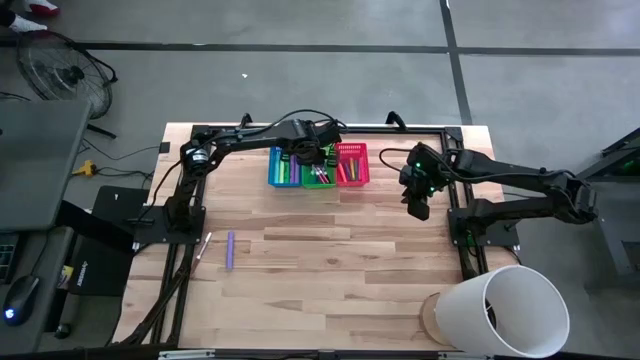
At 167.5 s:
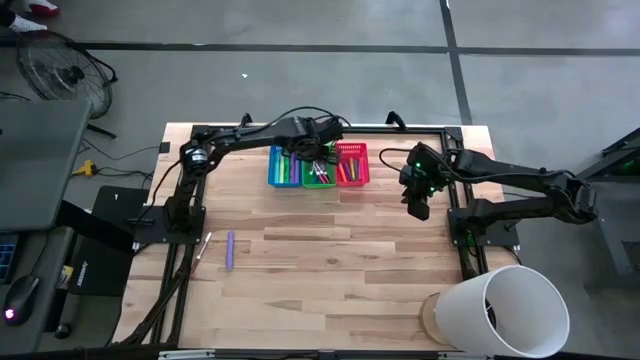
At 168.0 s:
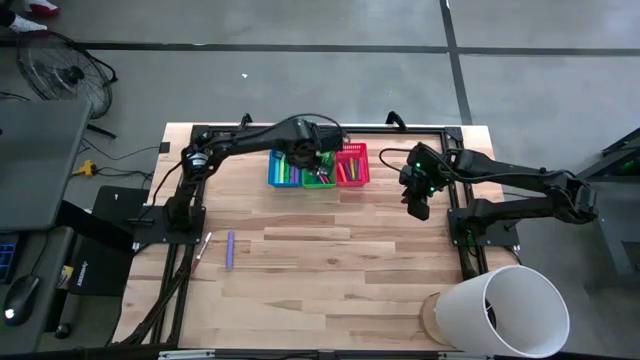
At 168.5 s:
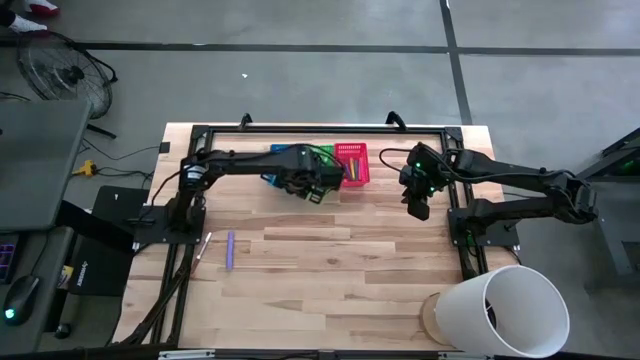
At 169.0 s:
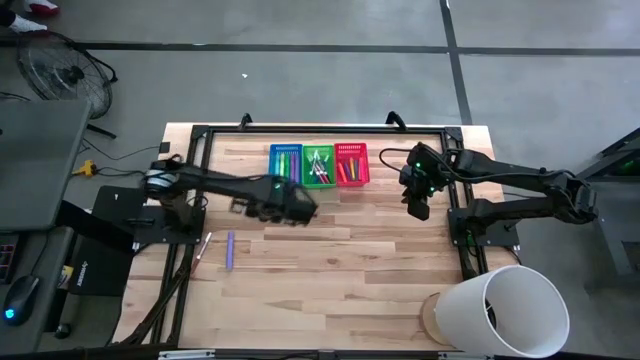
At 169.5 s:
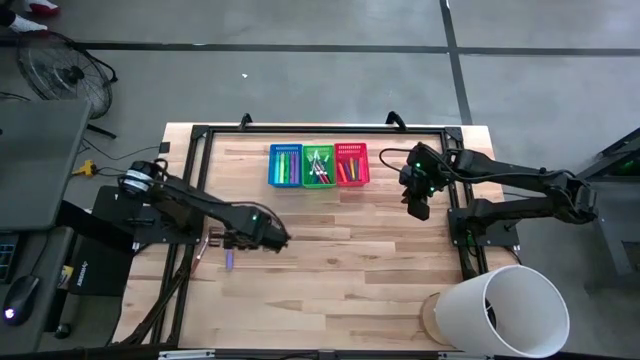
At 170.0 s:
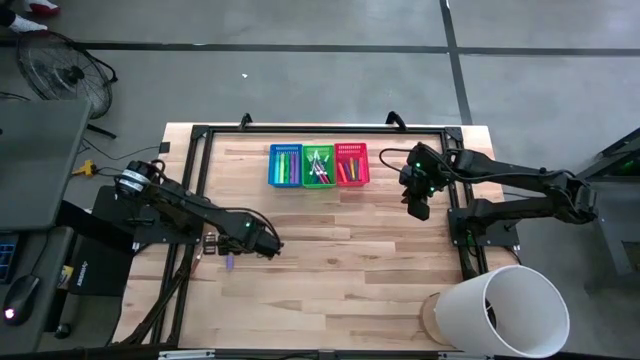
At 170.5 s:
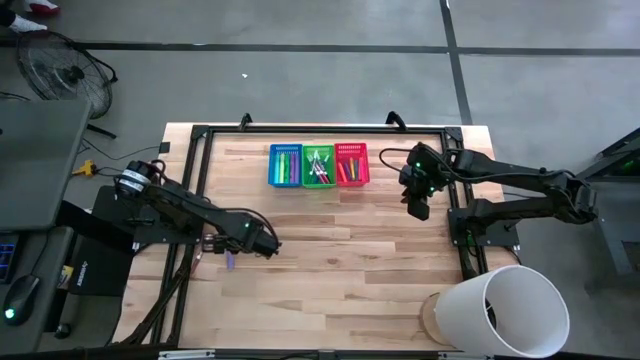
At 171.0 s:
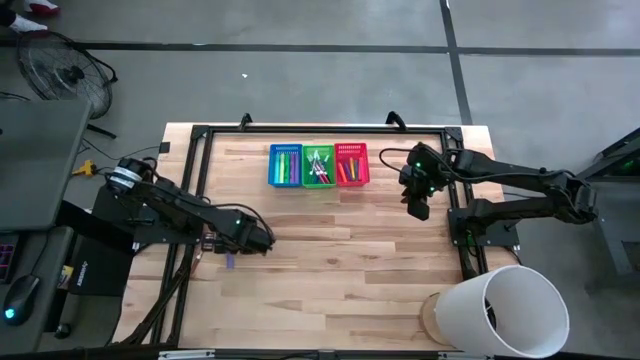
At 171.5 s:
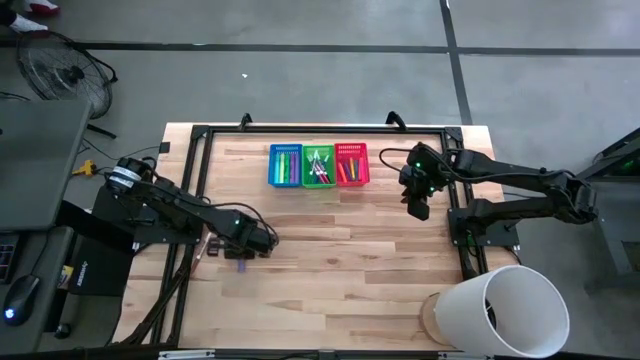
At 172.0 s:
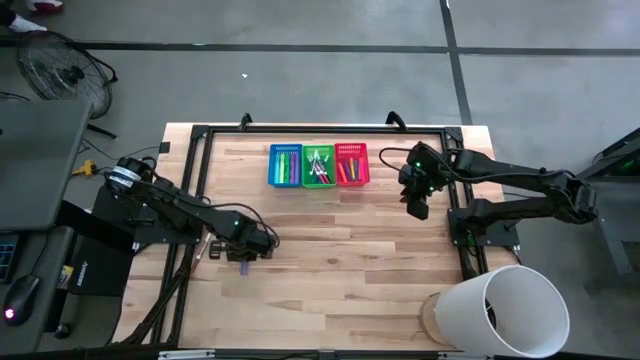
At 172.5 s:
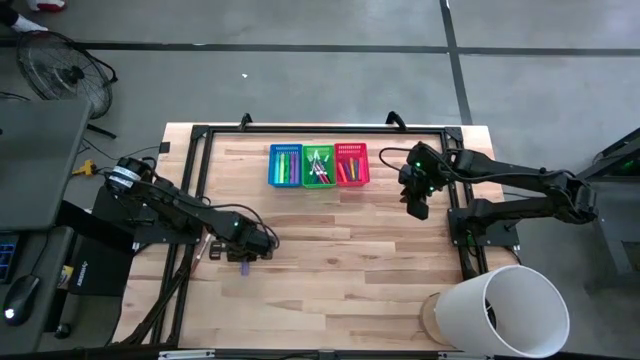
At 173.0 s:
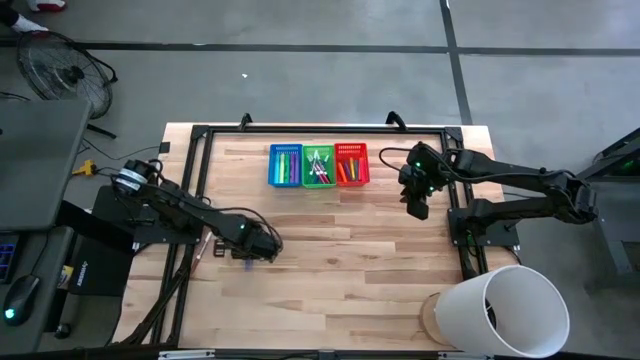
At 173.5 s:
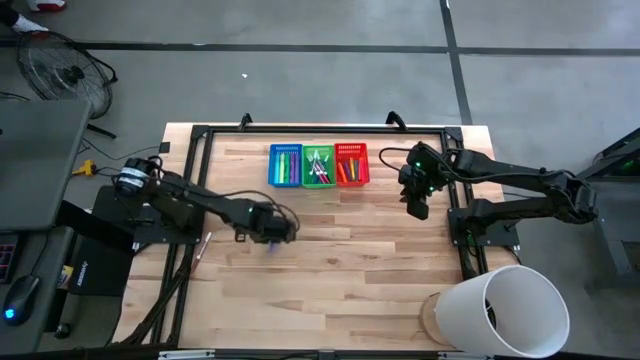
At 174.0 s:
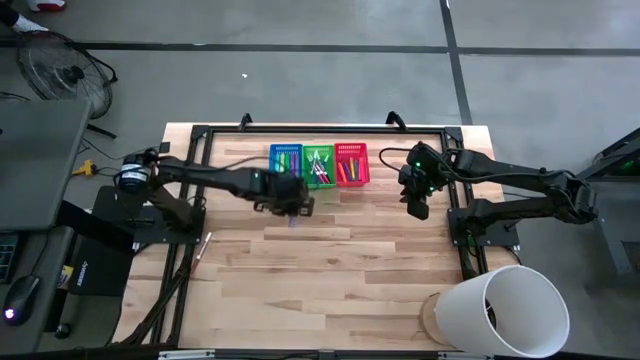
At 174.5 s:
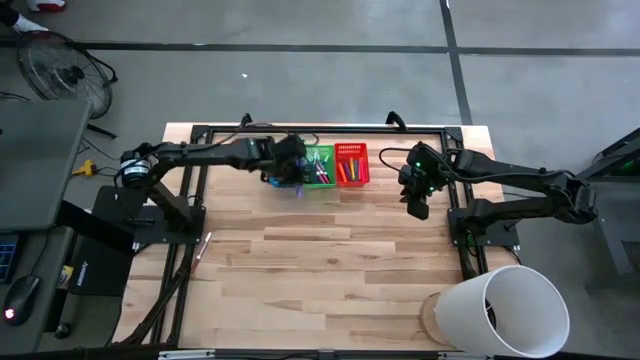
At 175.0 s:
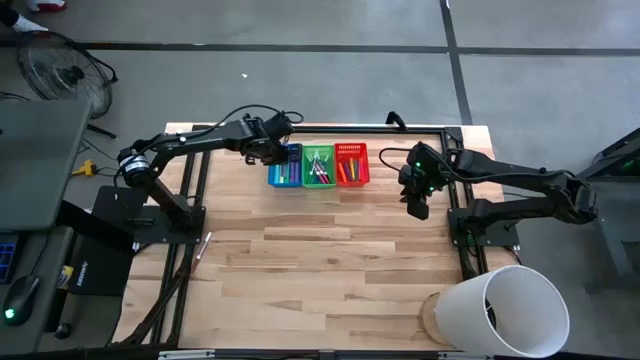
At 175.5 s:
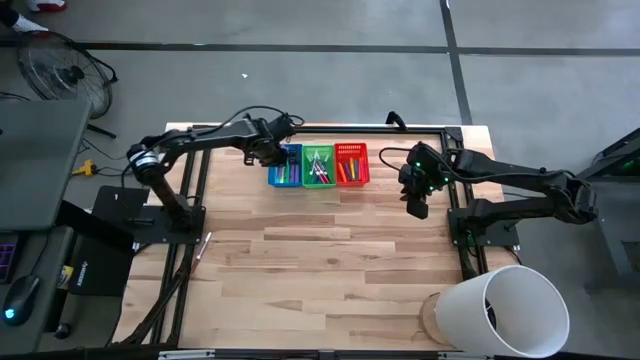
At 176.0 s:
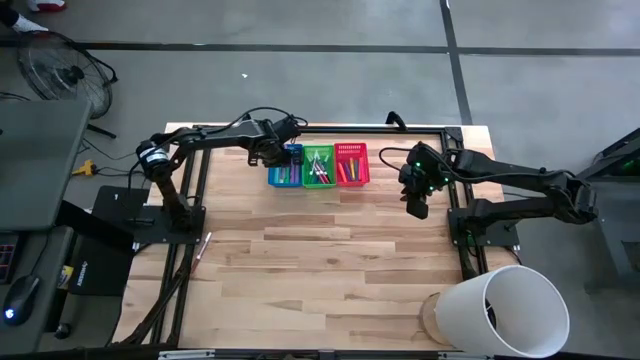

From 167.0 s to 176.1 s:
Task: Pick & Place Markers
Put the purple highlighter into the blue bin
